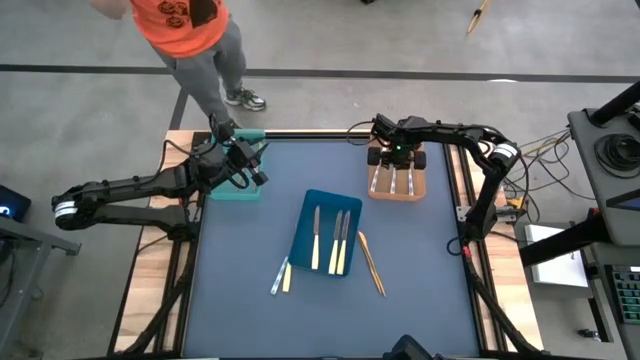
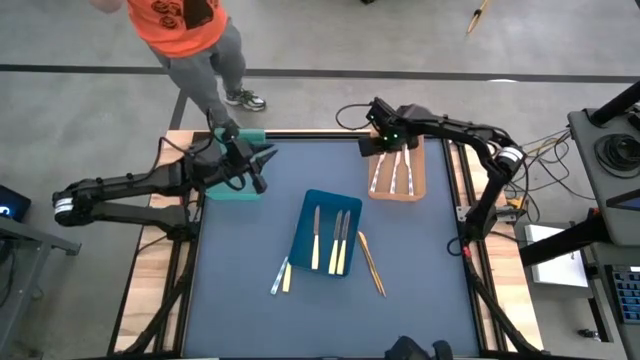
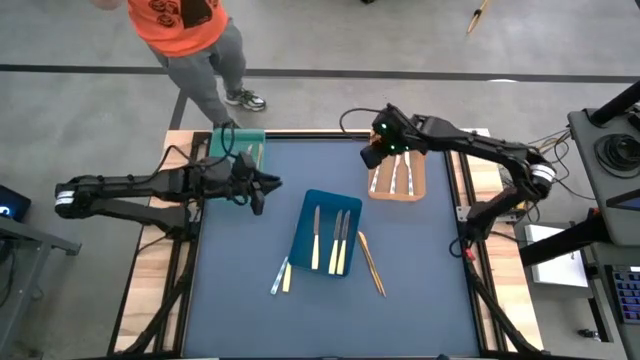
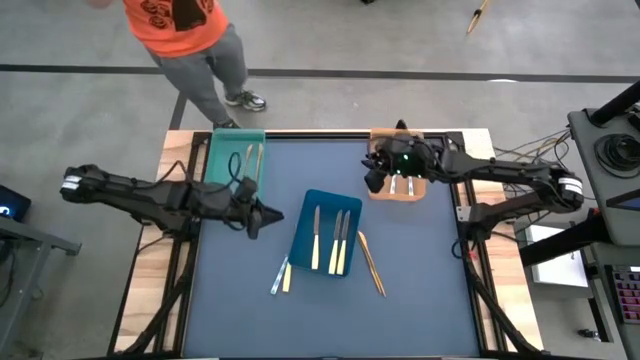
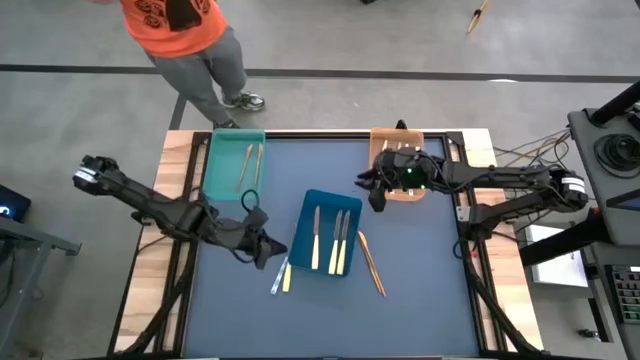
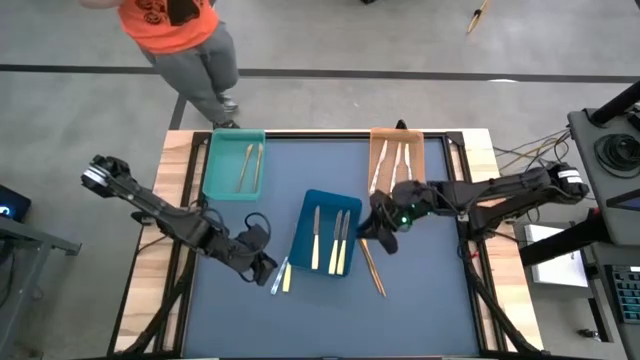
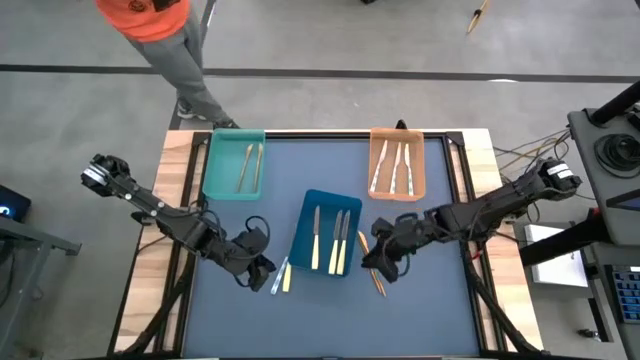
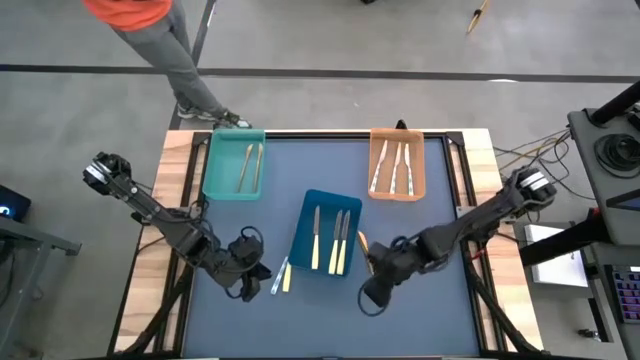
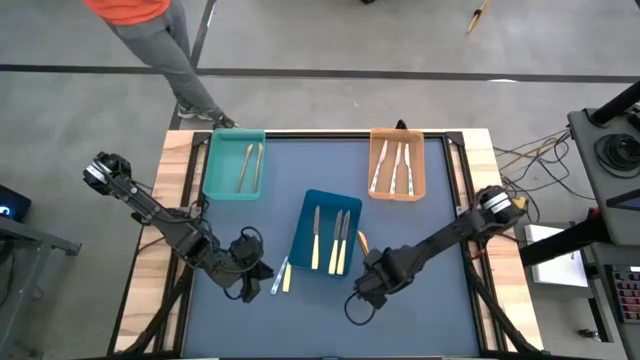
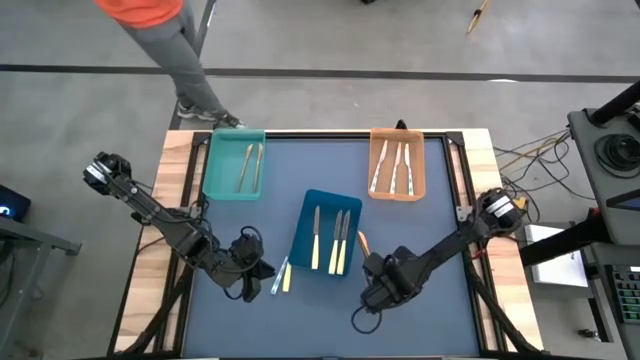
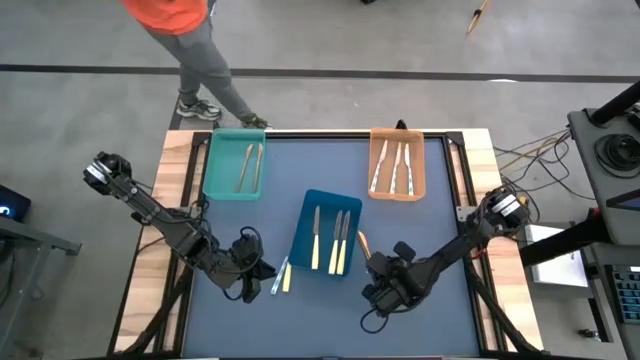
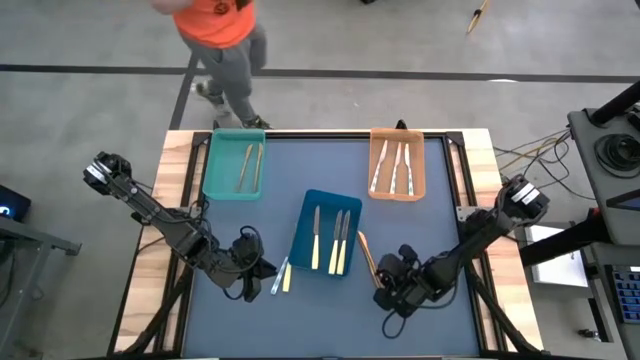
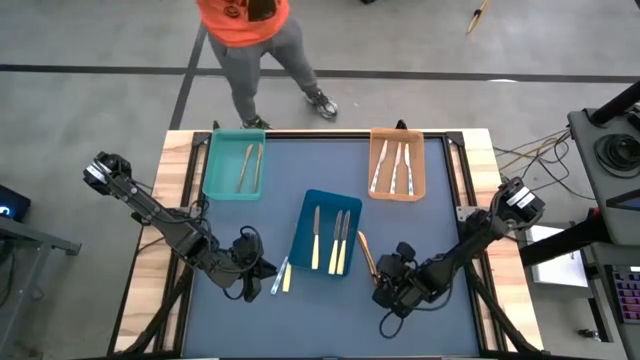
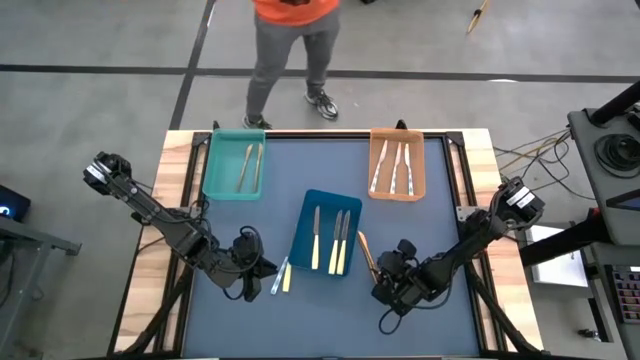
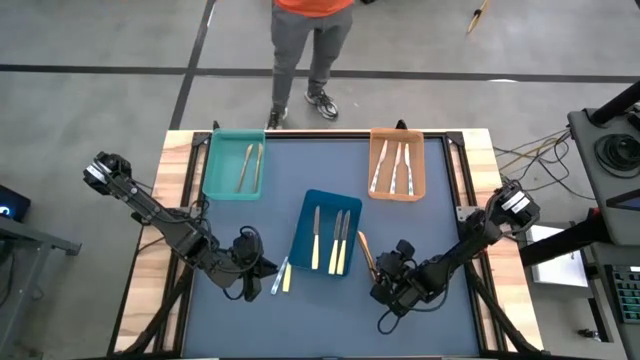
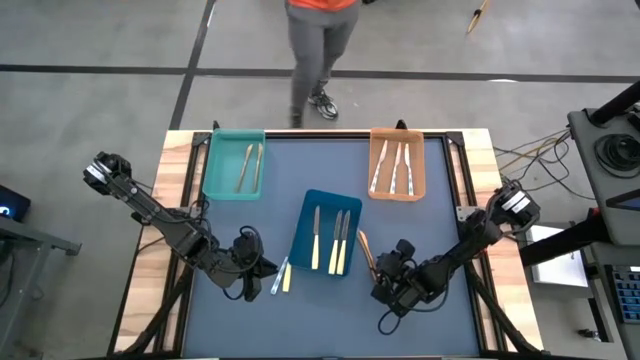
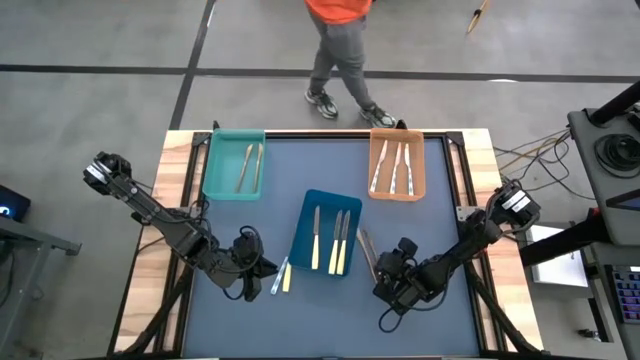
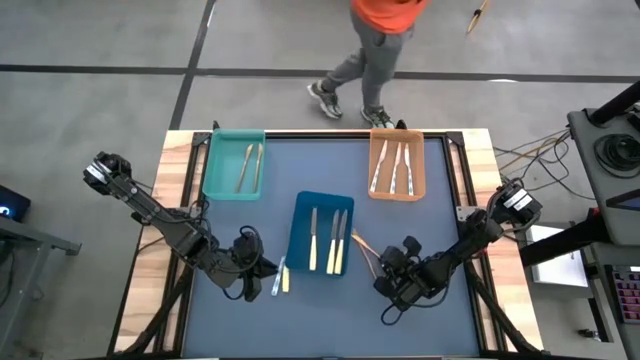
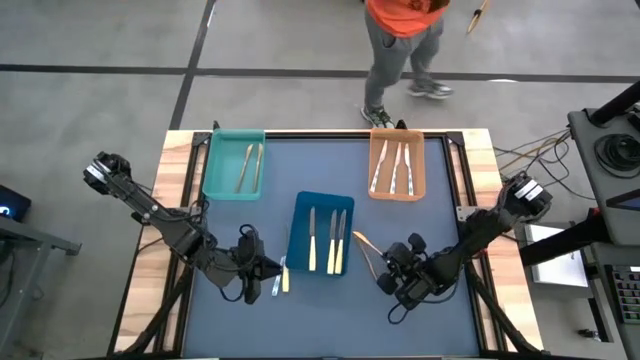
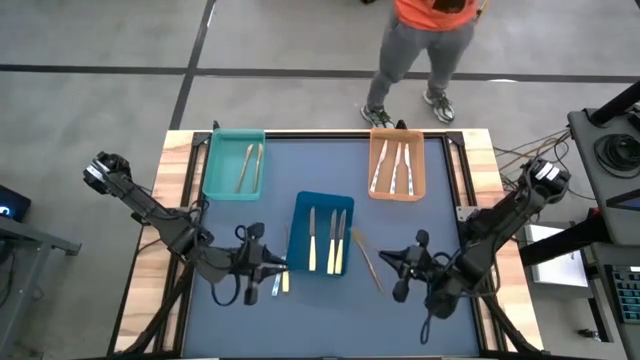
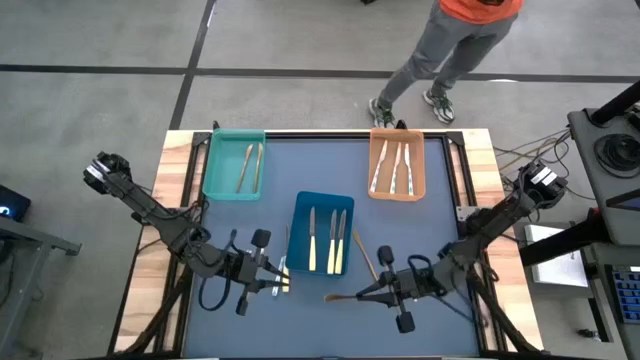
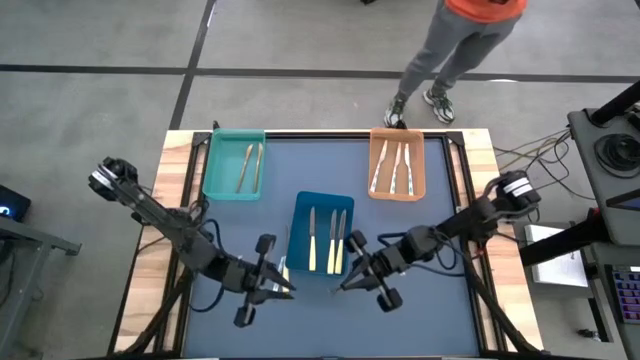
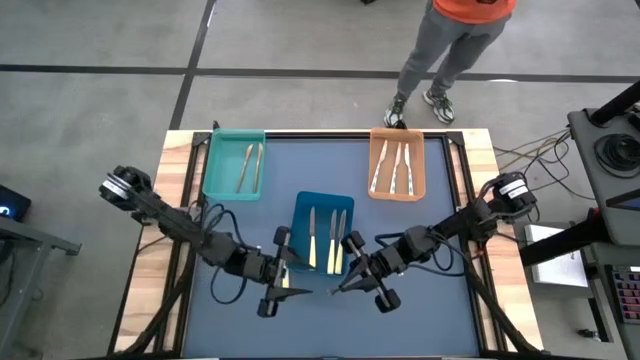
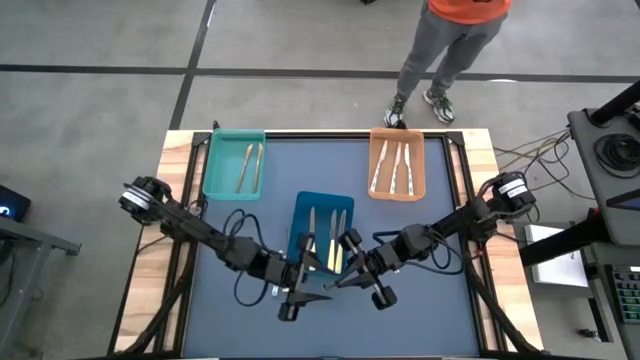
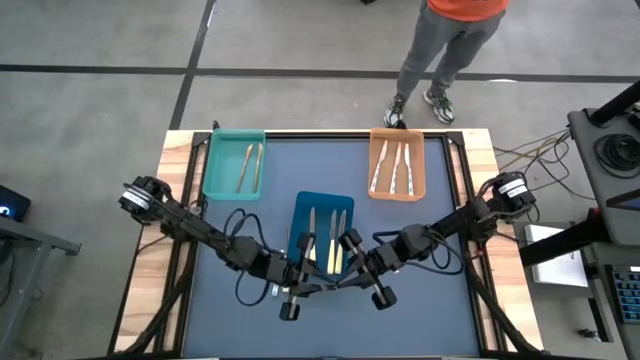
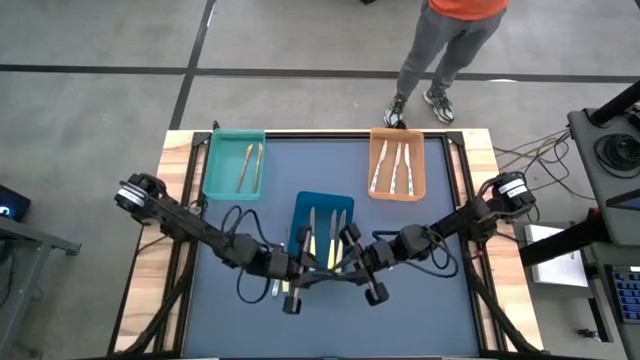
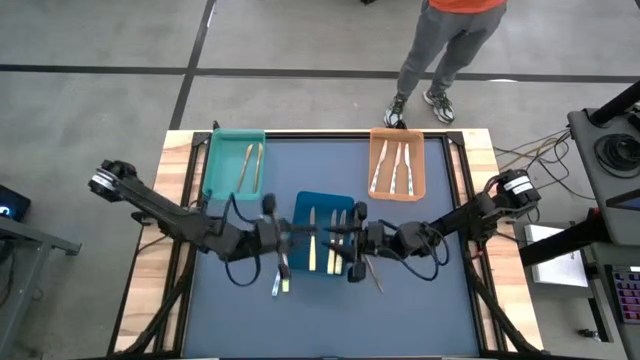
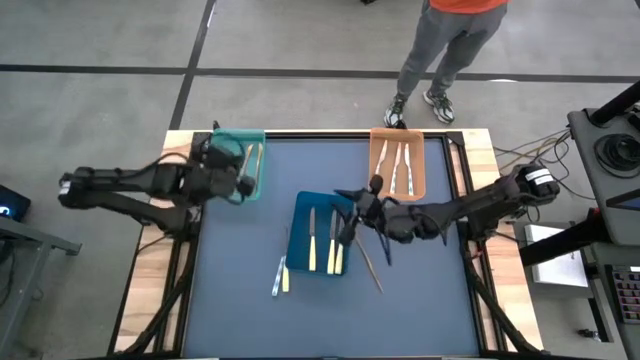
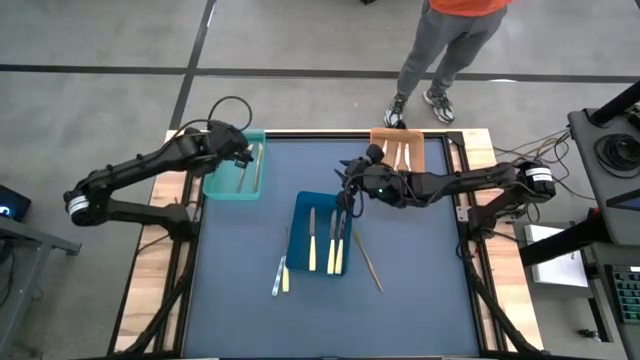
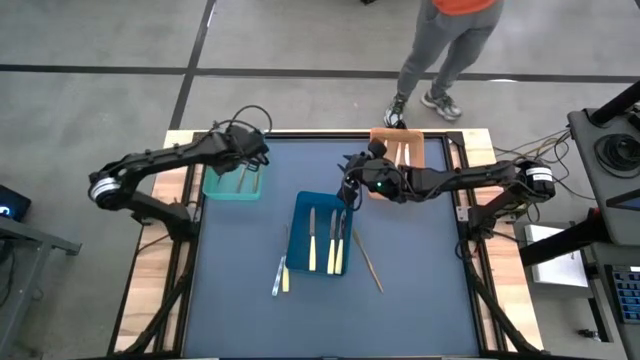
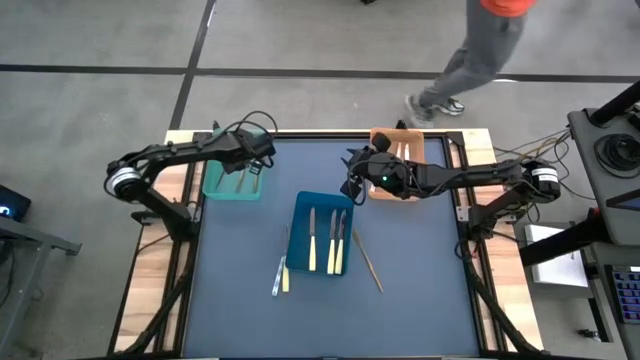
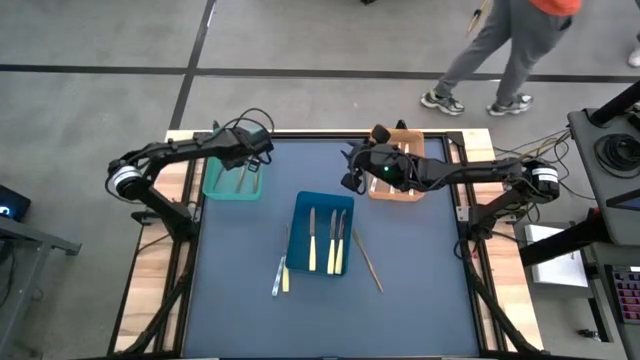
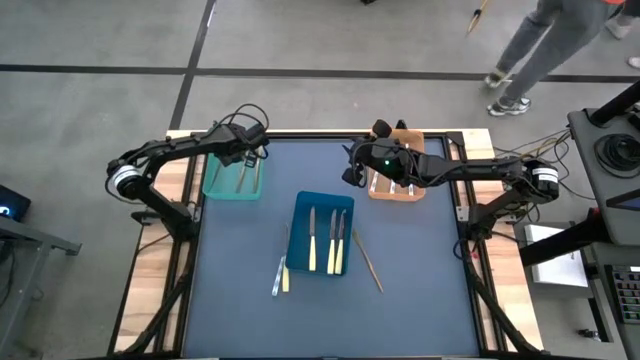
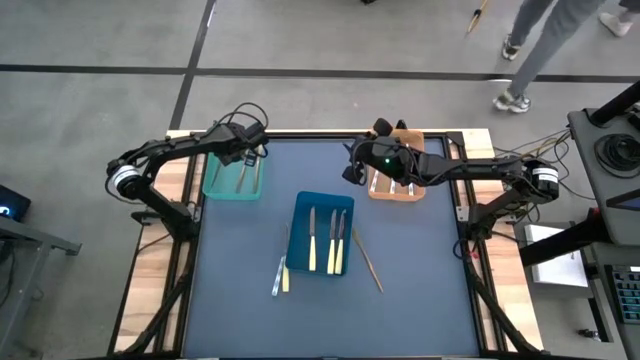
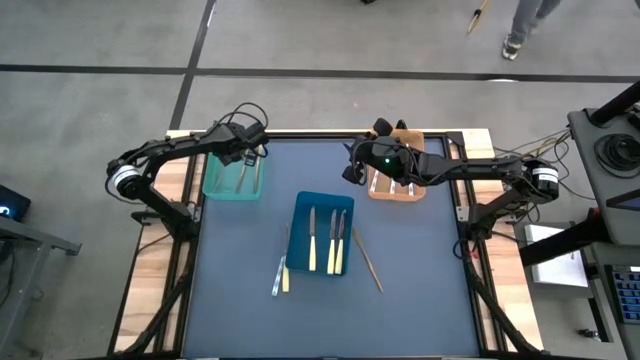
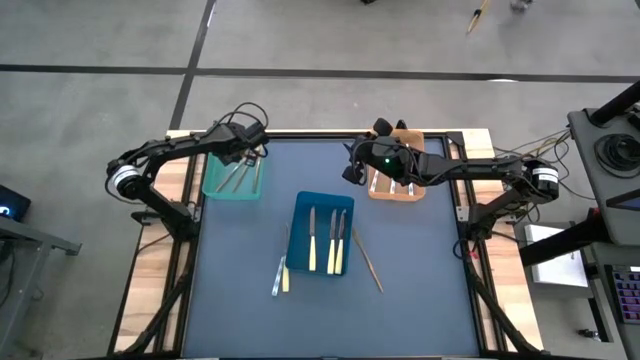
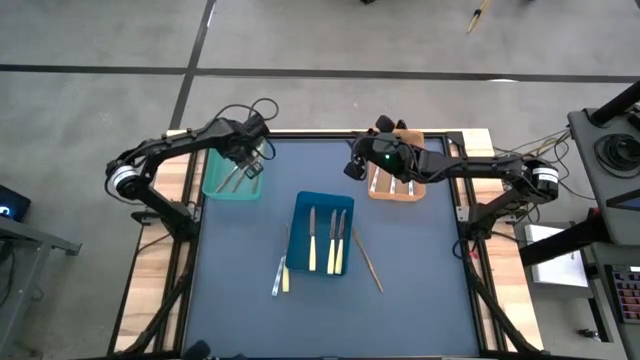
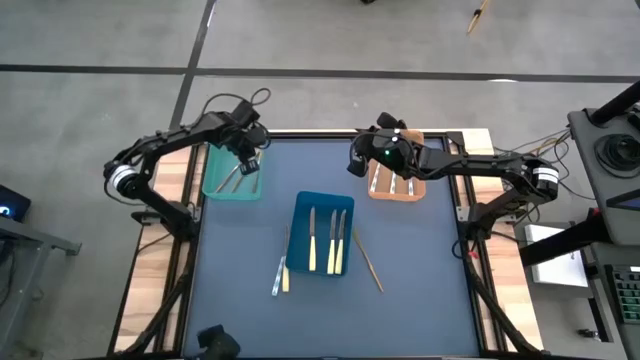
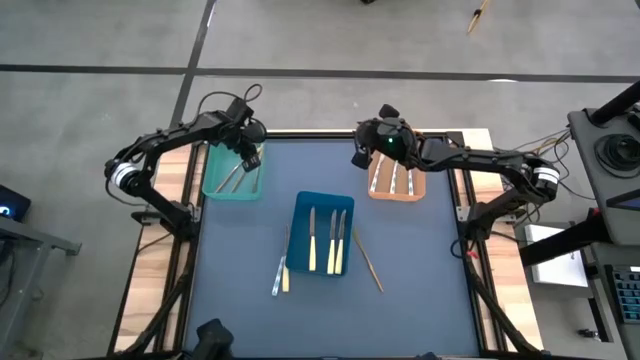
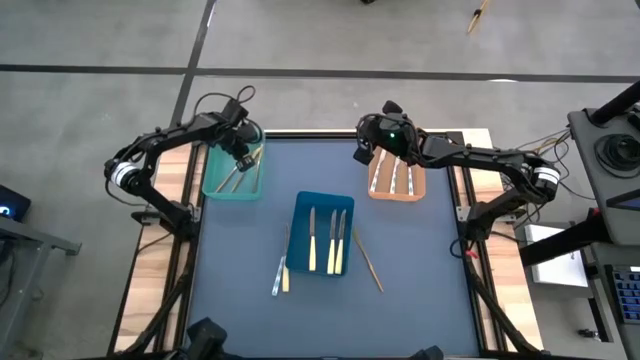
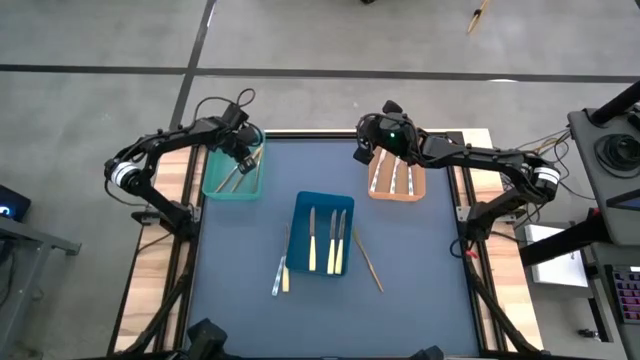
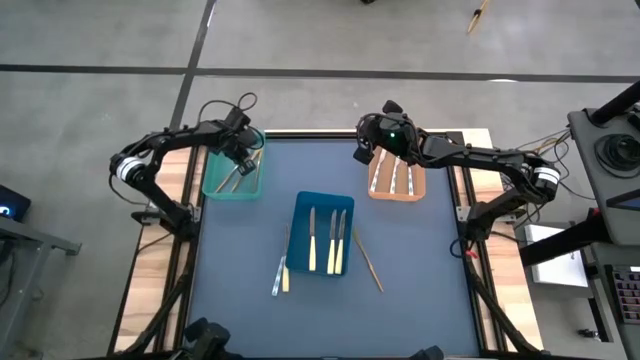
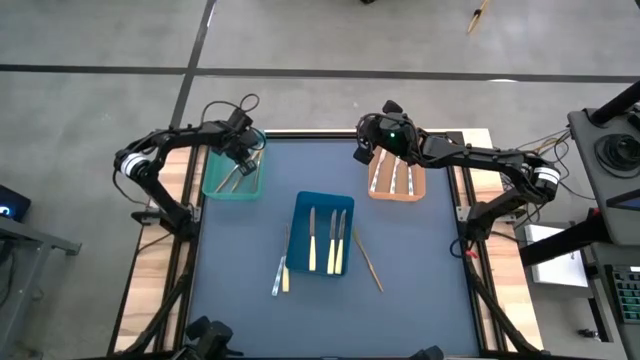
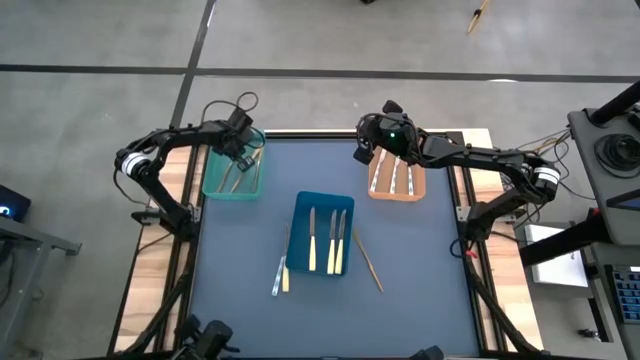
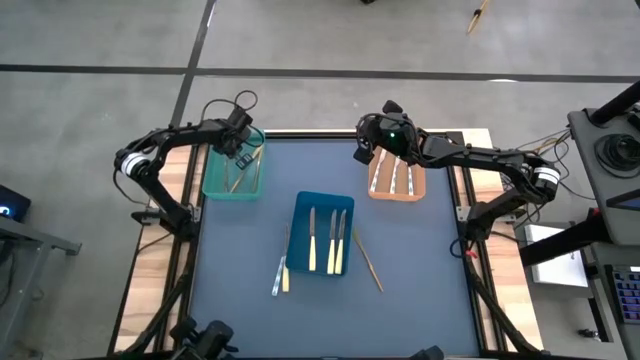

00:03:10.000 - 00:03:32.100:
Task: Sort silverware by color (type)
Put the right gold knife into the light blue bin
